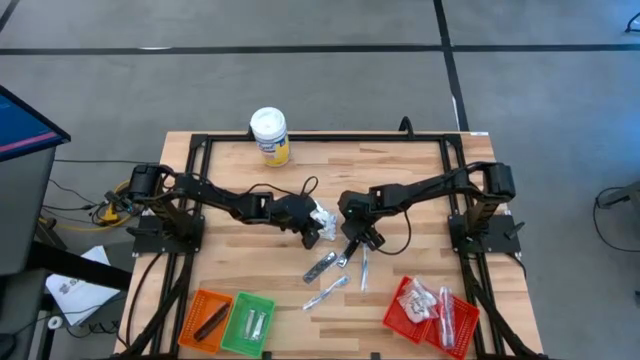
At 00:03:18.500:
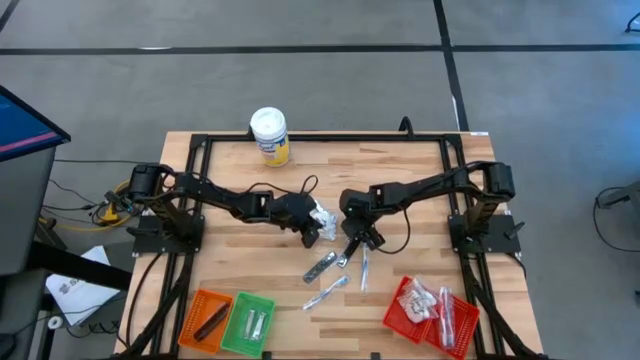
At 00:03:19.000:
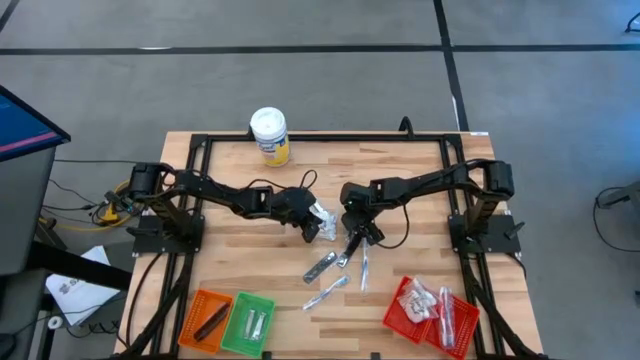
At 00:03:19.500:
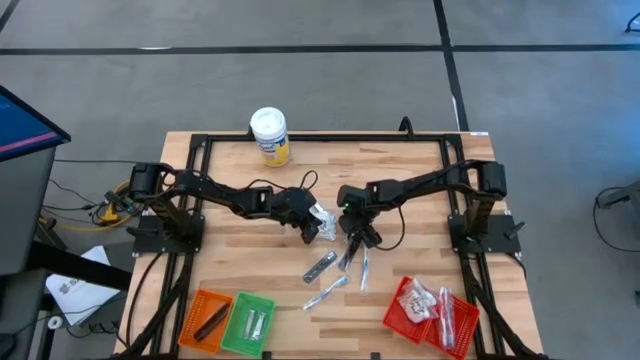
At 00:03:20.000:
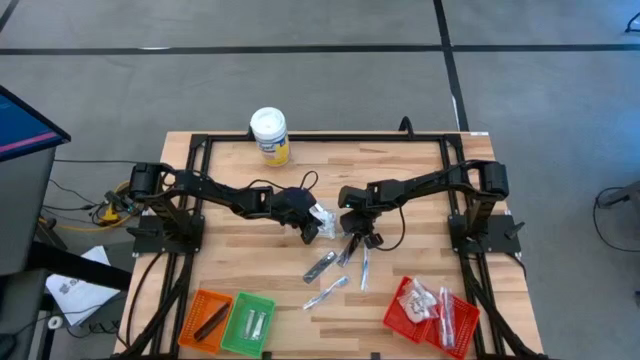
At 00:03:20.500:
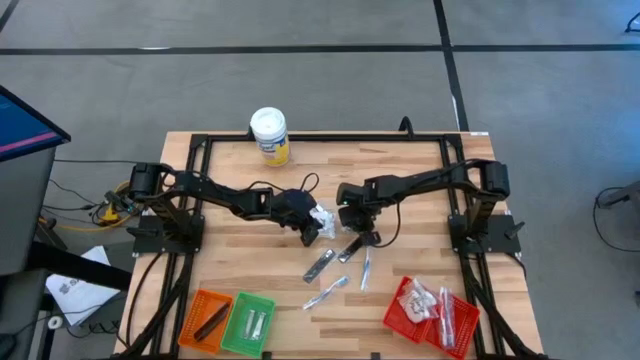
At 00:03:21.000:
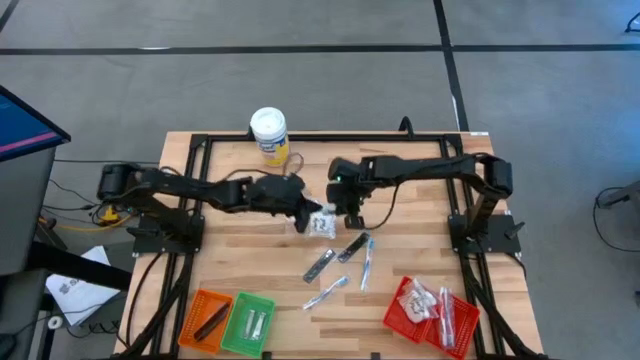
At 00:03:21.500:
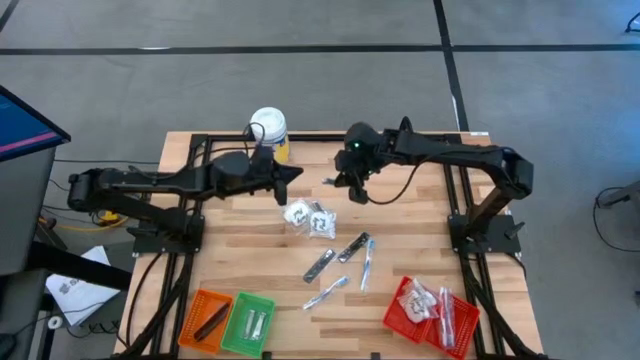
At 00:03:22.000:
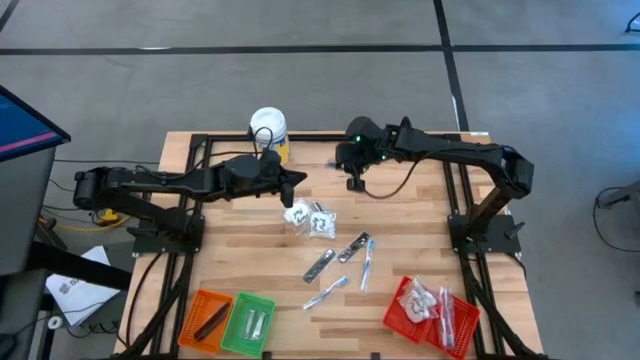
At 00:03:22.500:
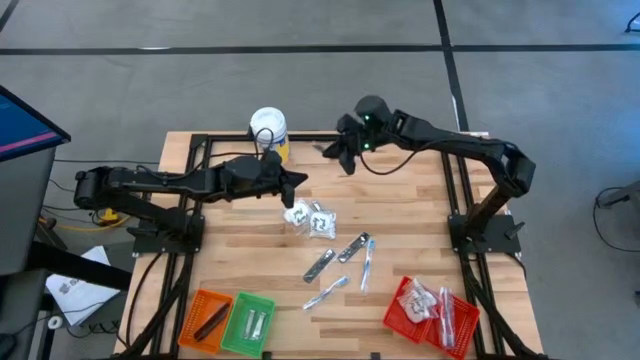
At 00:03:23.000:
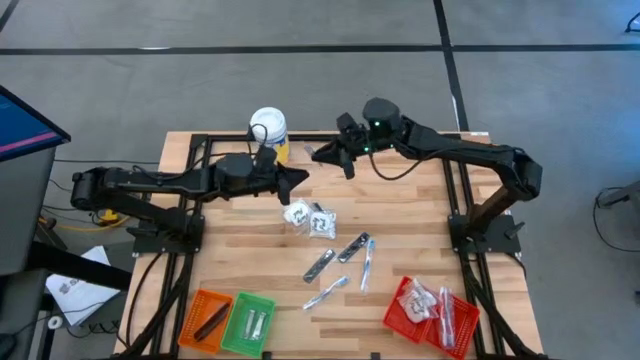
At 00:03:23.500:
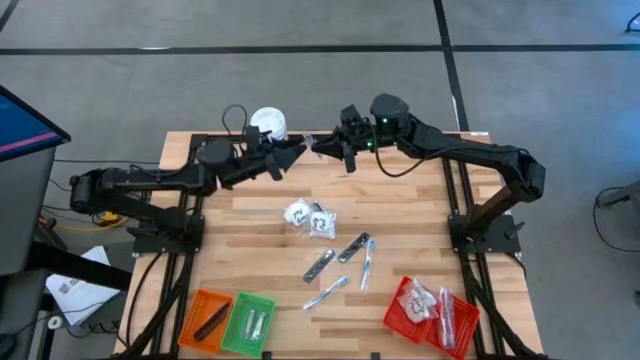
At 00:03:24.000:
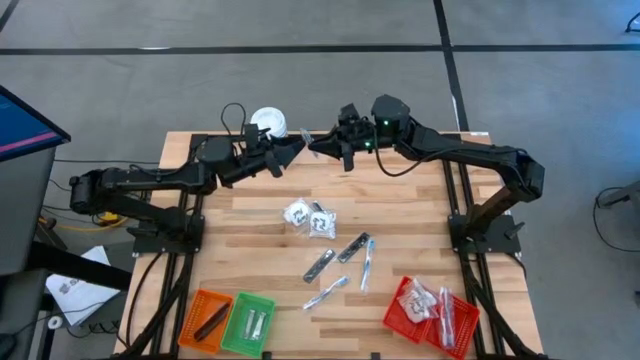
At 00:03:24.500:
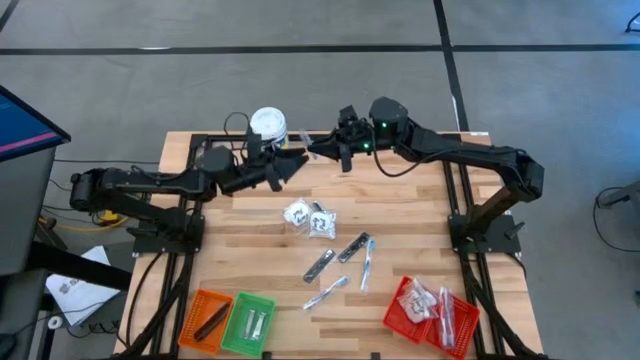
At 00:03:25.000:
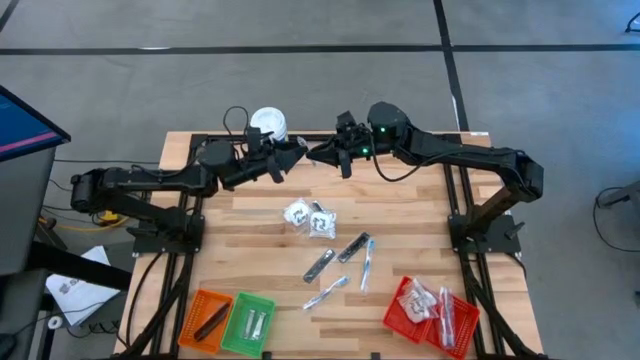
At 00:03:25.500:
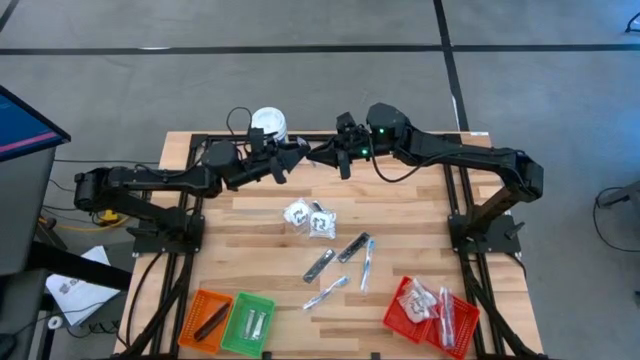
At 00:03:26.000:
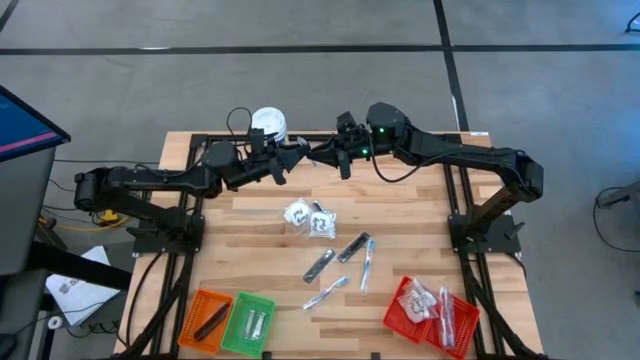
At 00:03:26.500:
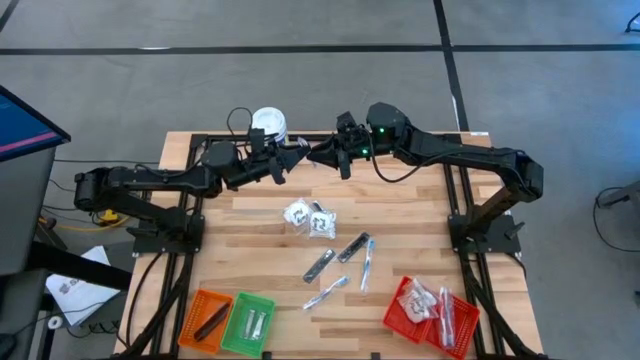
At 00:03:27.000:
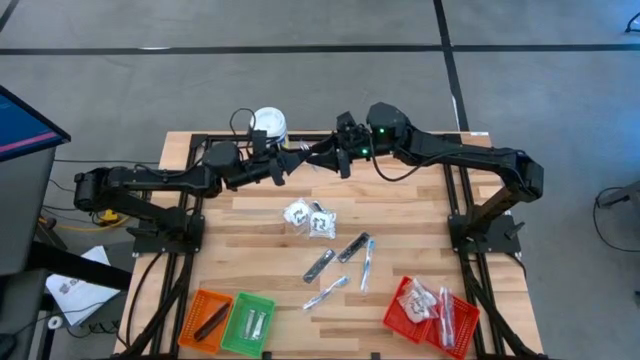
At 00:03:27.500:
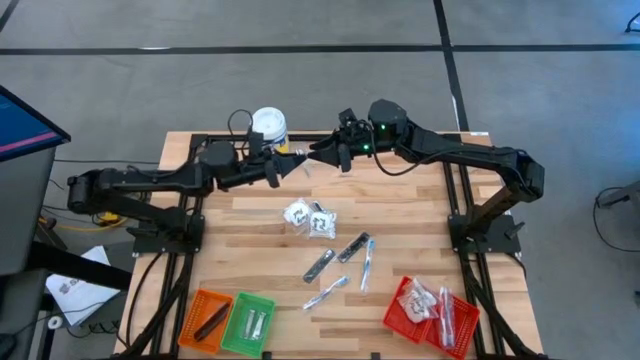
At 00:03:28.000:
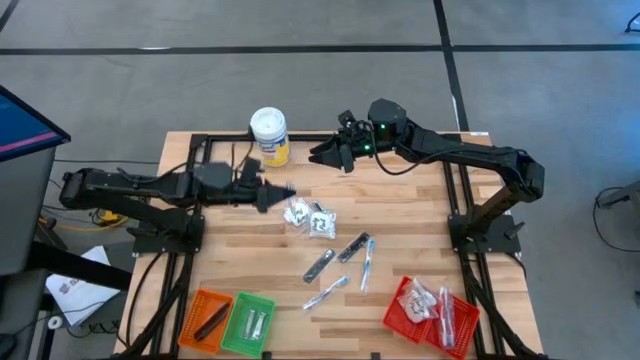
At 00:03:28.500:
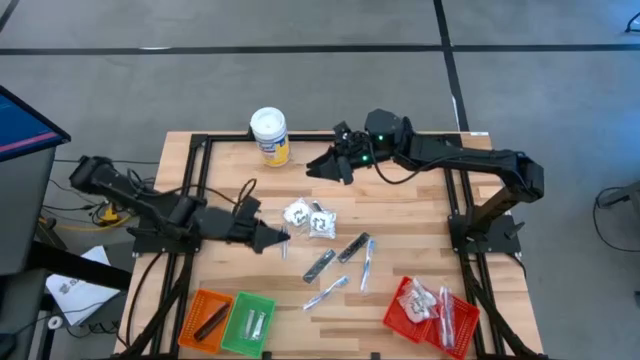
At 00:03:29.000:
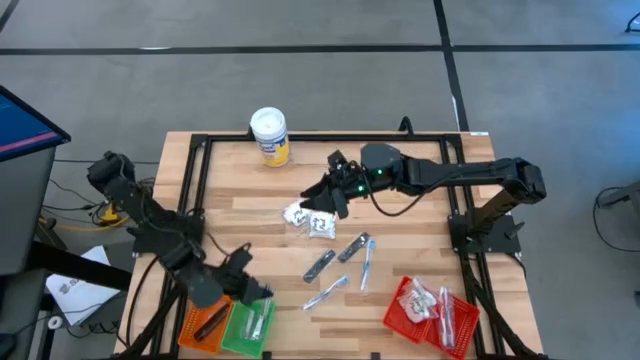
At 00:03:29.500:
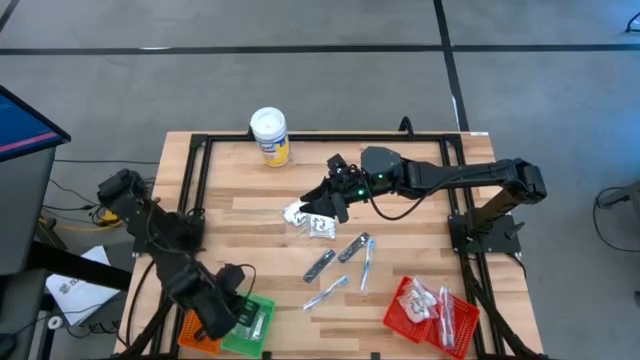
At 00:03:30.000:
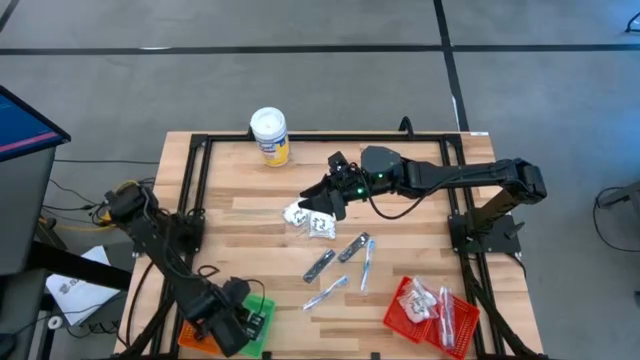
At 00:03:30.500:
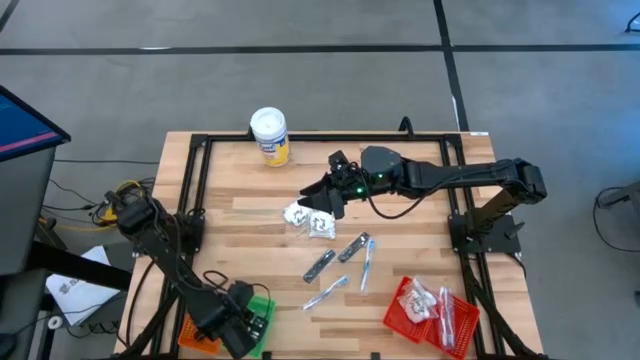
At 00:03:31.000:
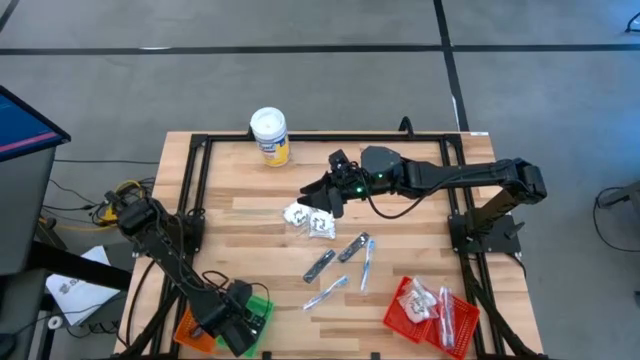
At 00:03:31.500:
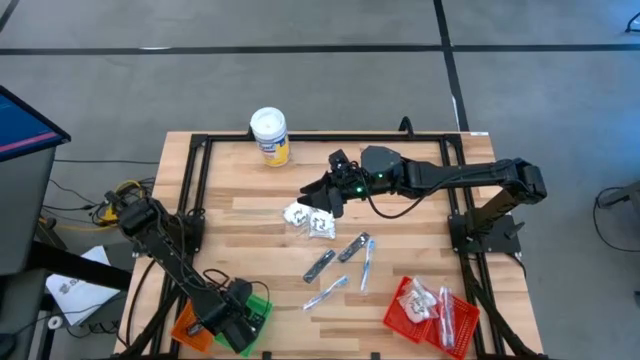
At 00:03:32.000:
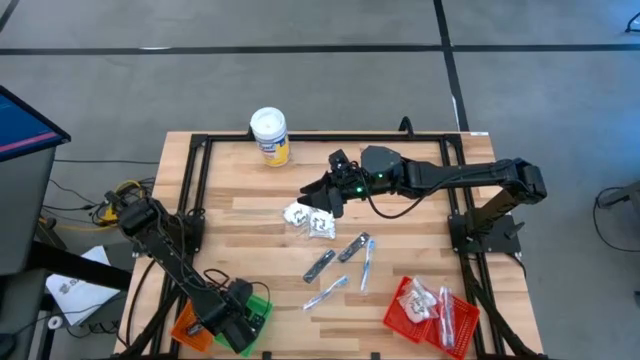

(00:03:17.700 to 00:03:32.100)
Task: Pick & Place Travel size toiletries
Put the nail cutter into the green basket

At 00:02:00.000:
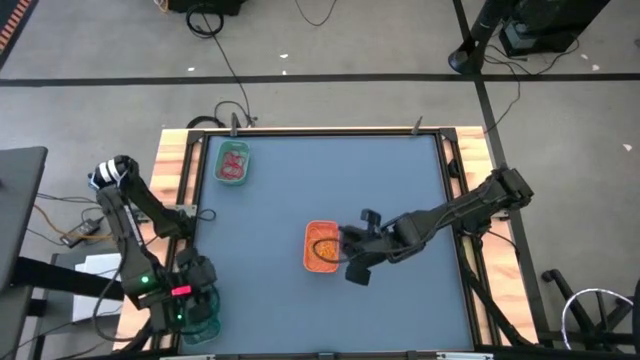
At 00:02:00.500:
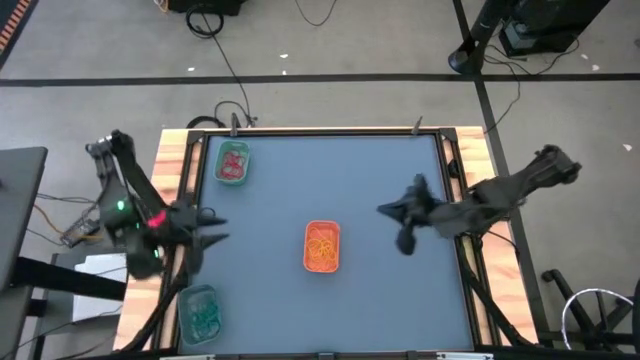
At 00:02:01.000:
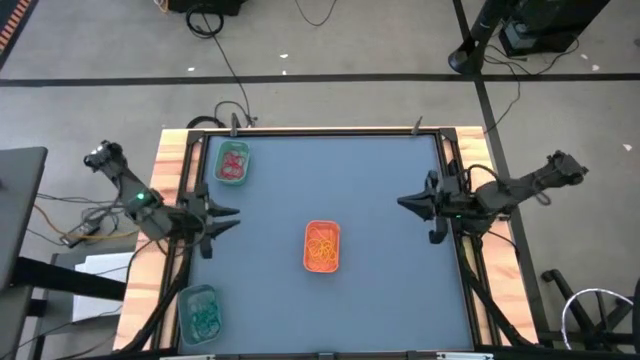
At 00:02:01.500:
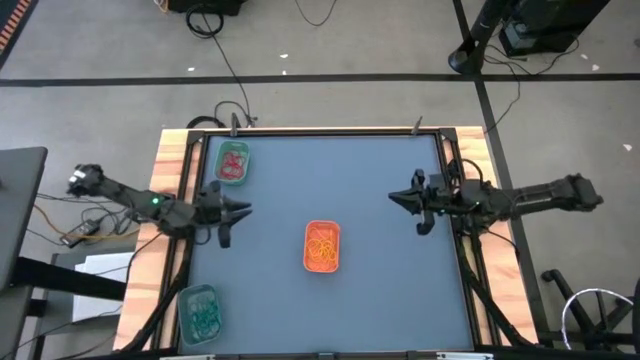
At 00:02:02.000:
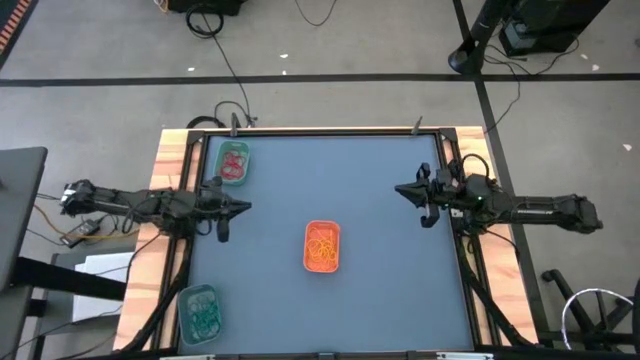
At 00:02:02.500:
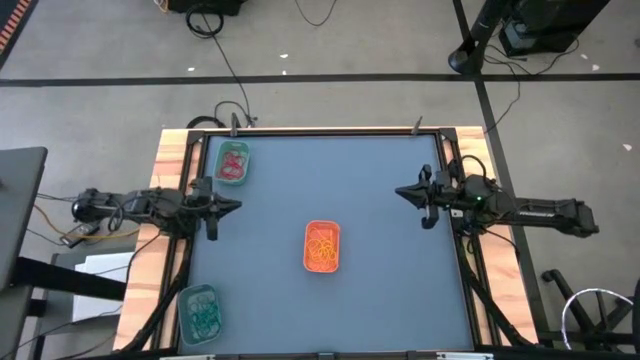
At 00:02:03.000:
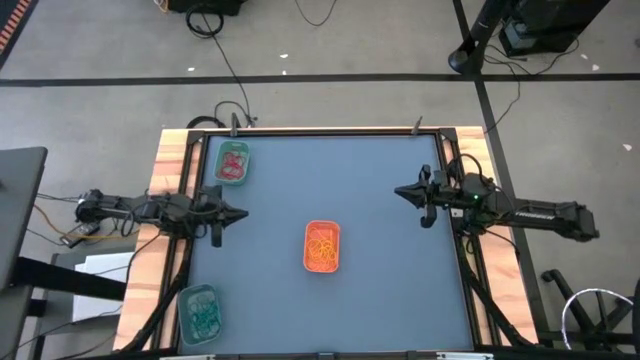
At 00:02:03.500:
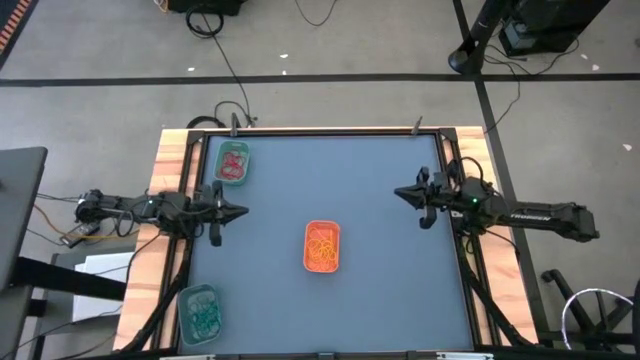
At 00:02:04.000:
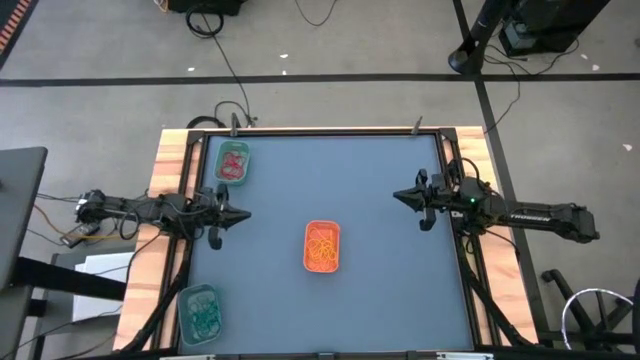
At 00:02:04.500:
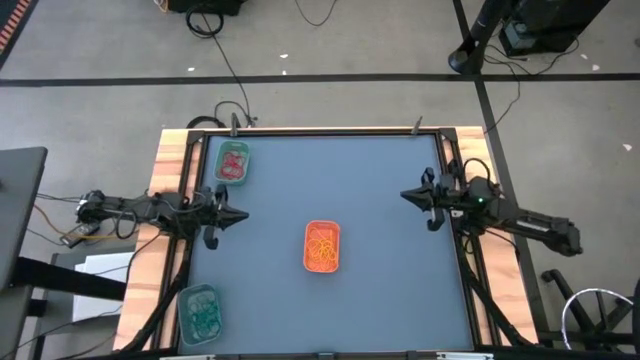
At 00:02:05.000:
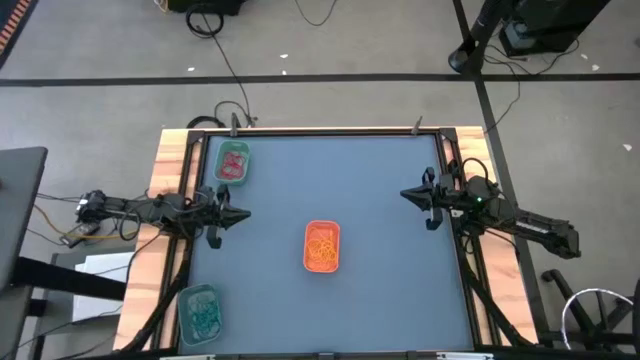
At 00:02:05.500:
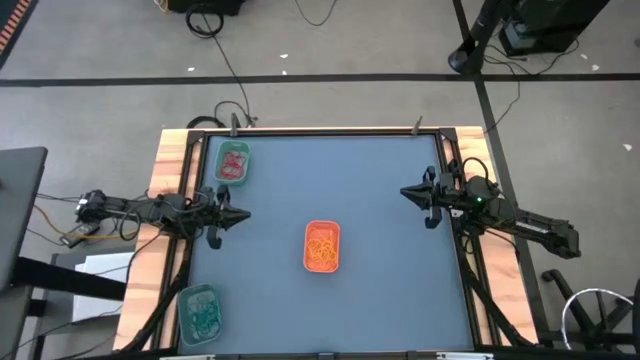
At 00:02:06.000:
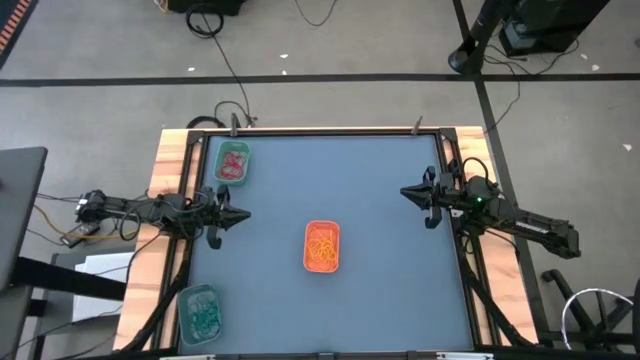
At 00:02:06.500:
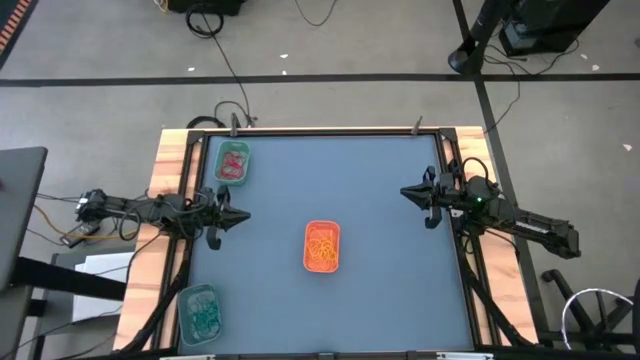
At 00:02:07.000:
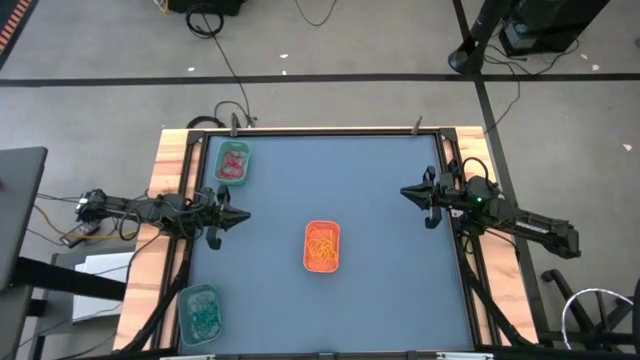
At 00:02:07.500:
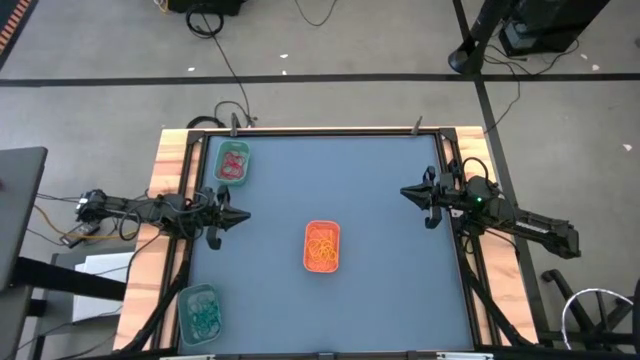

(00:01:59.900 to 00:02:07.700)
Task: Sort rubber bands into baskets
Return to Home Position
